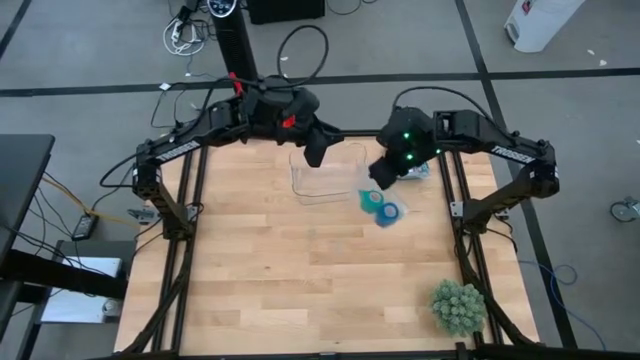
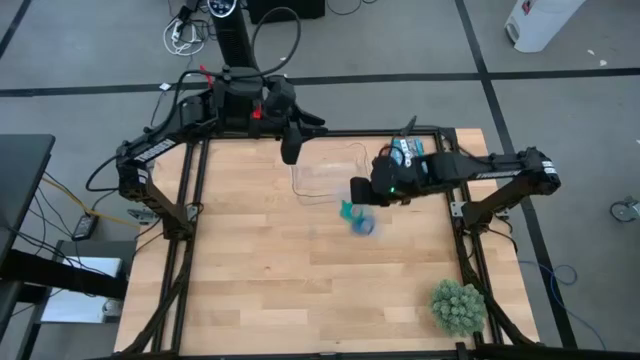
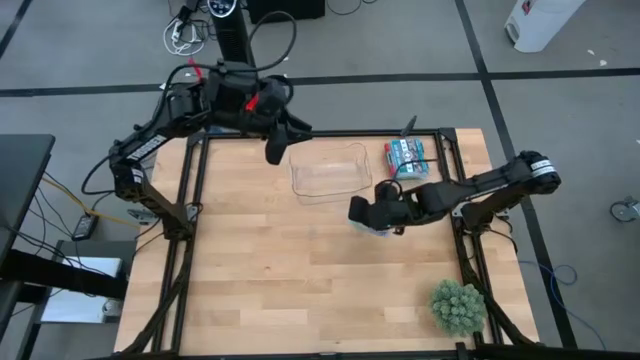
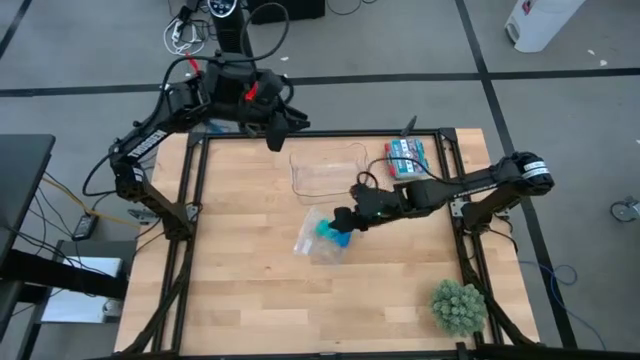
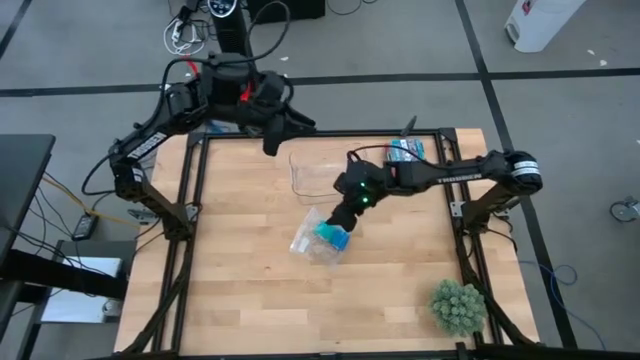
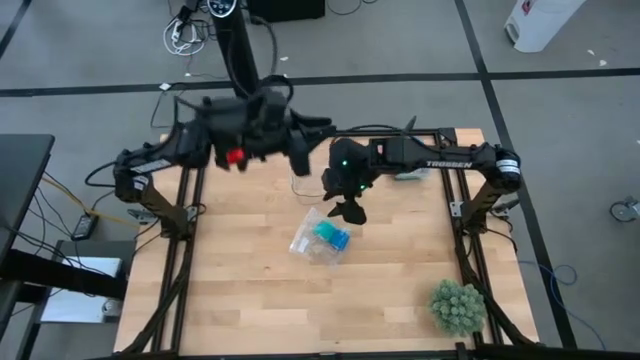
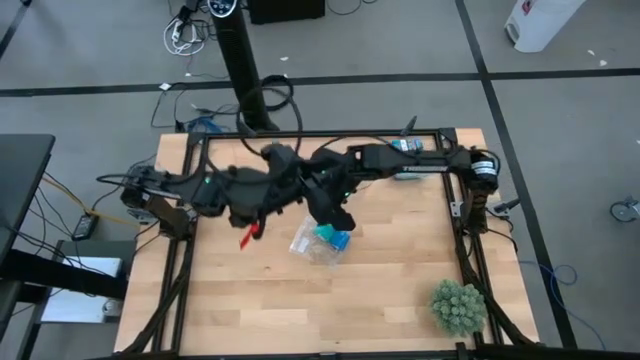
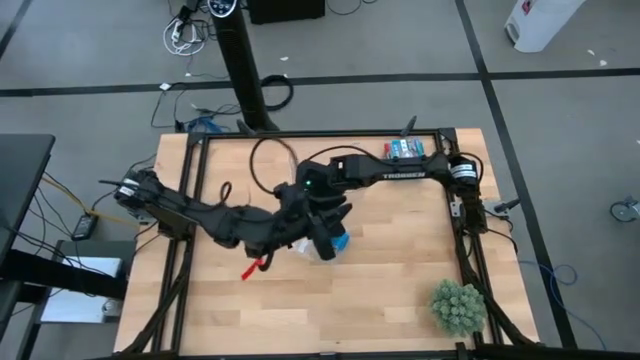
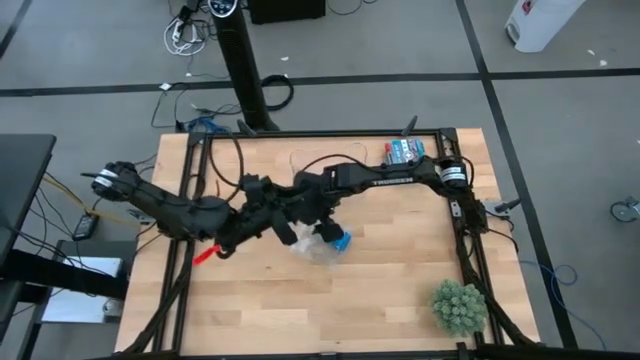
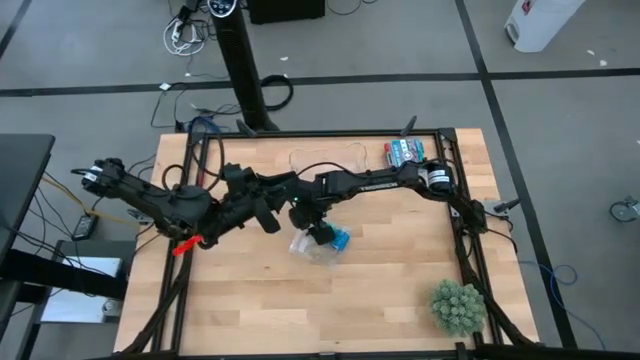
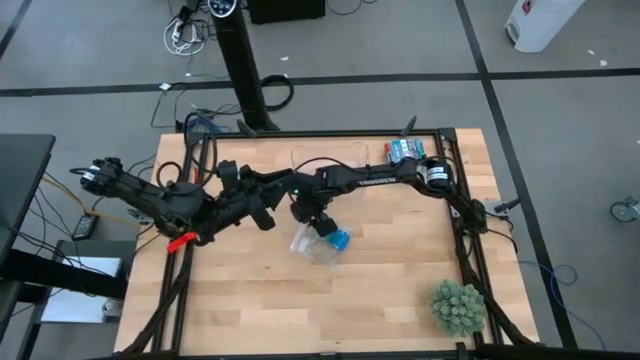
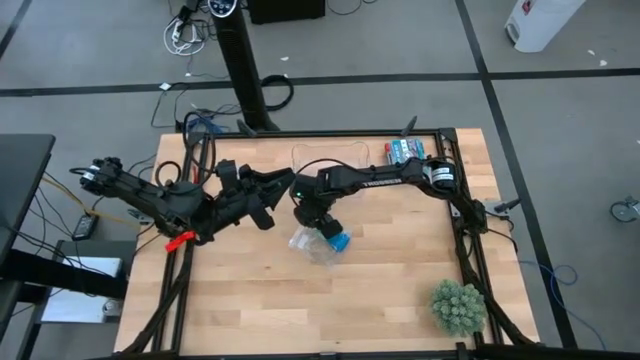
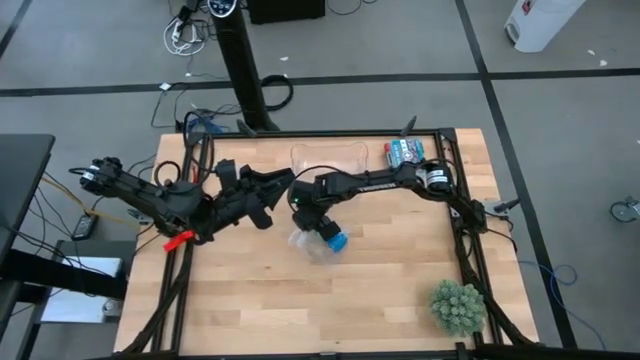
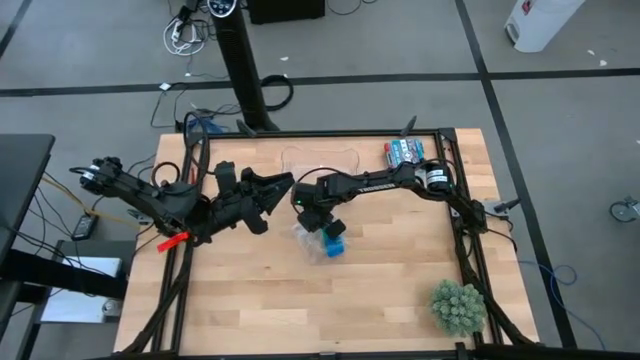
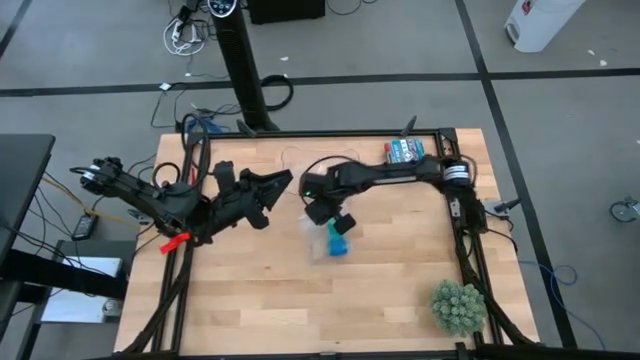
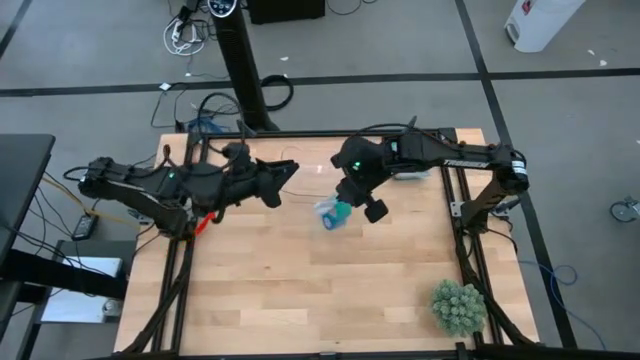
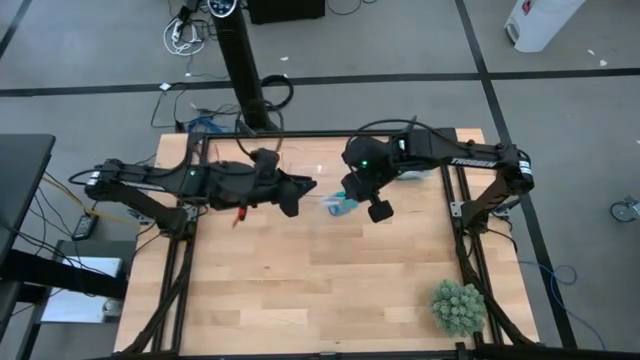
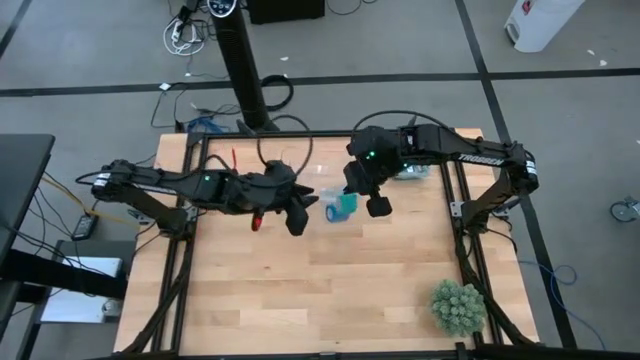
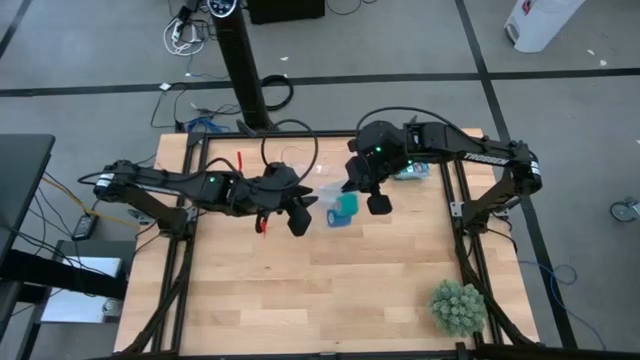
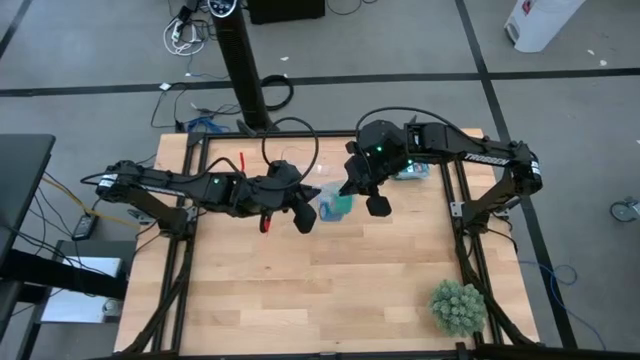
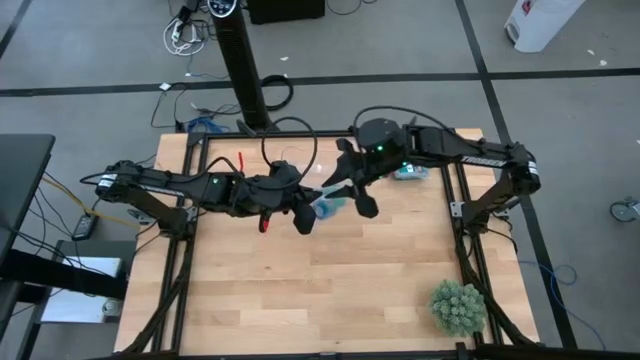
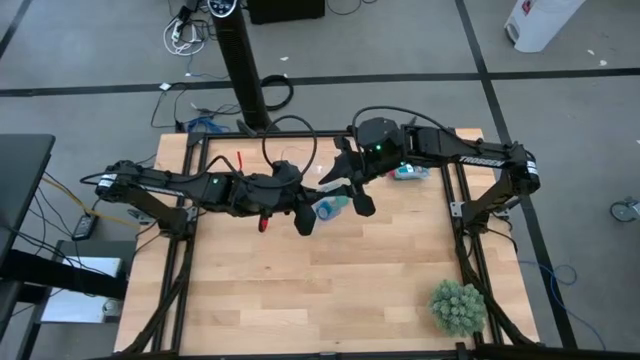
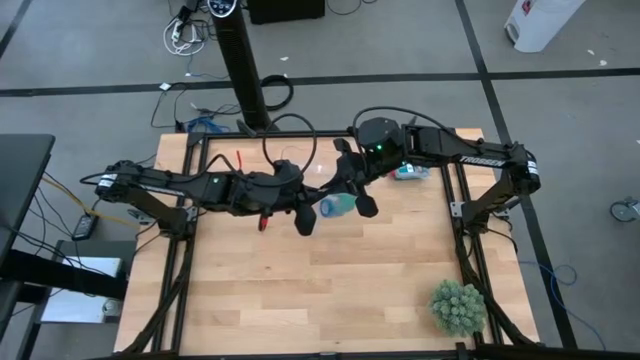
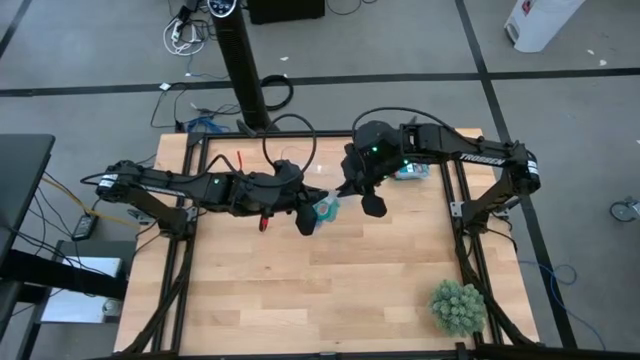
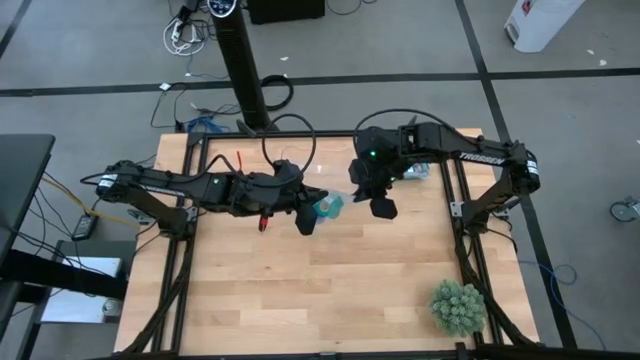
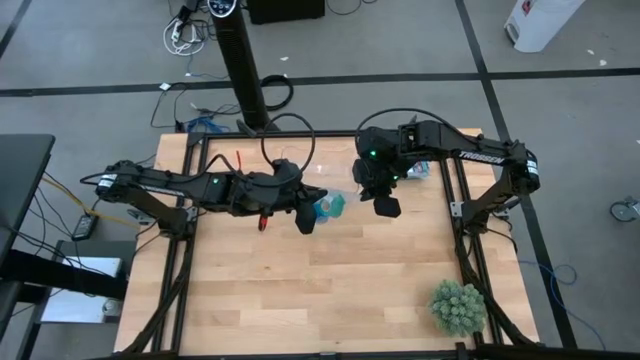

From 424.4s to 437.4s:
Task: Roll bandage
Close the transparent zip bag

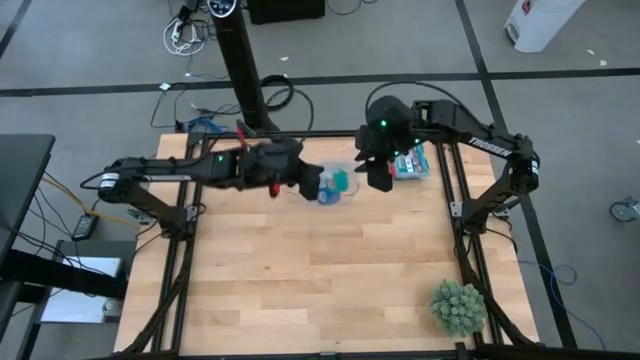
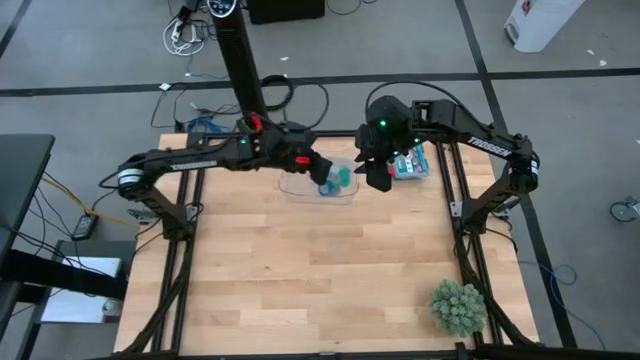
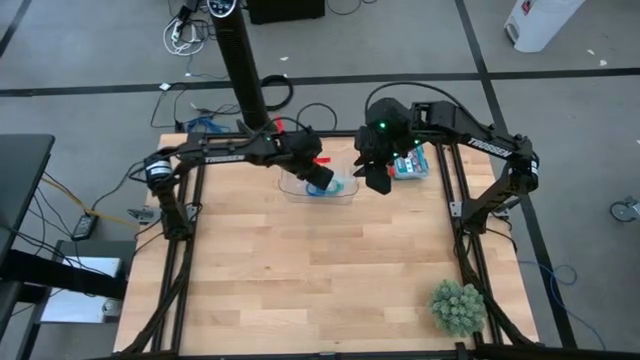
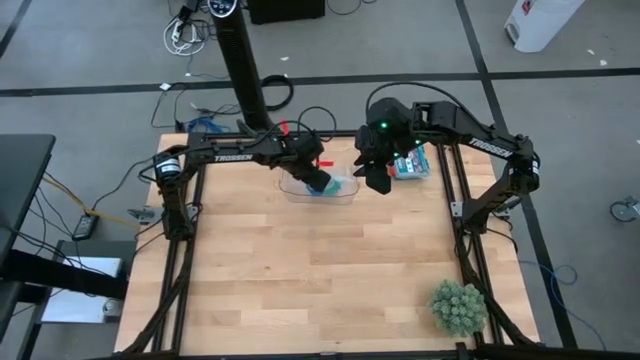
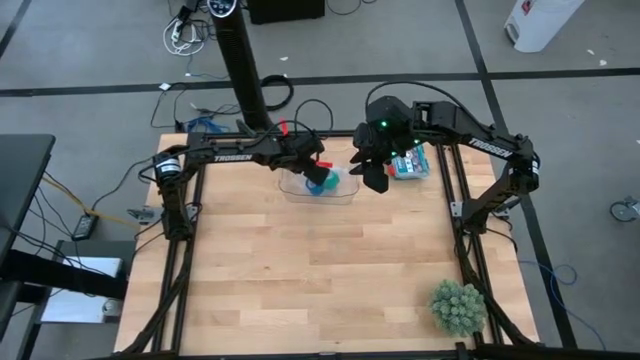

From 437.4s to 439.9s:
Put the transparent zip bag into the transparent bin

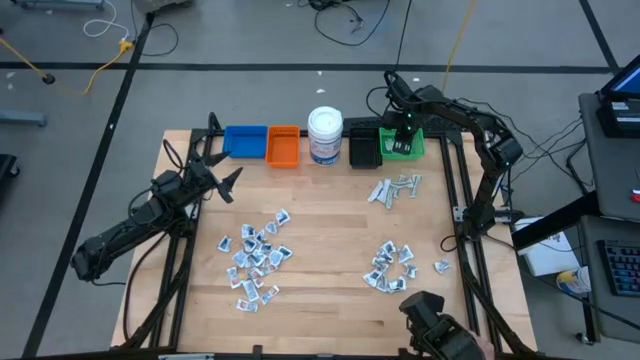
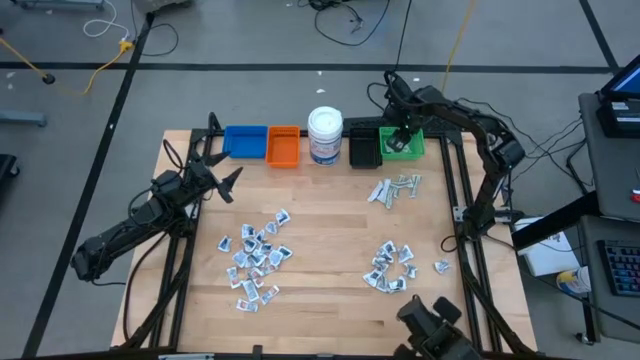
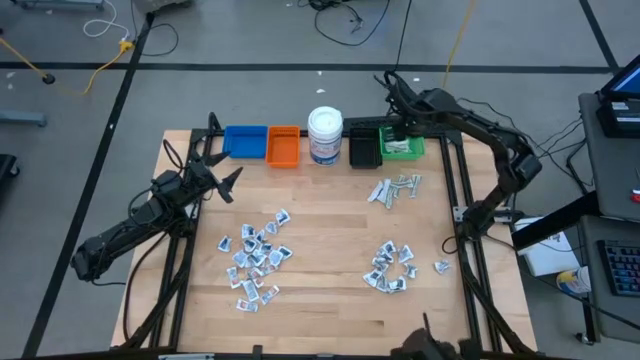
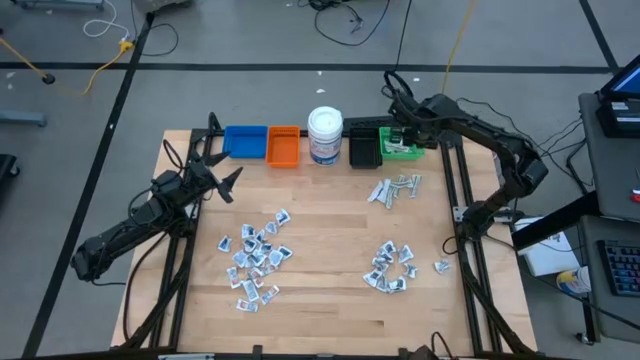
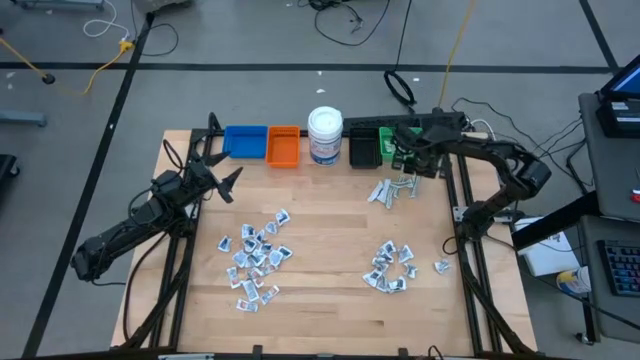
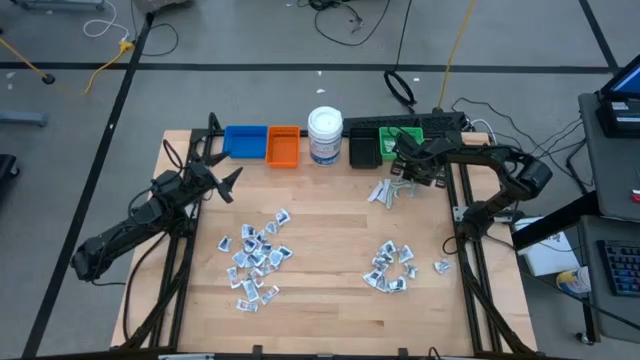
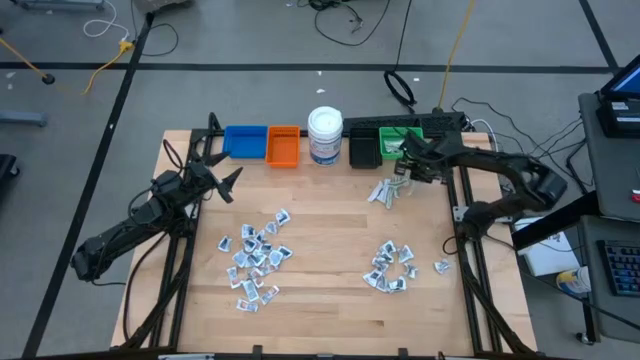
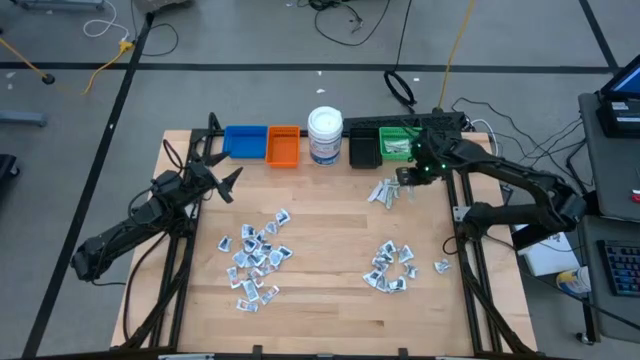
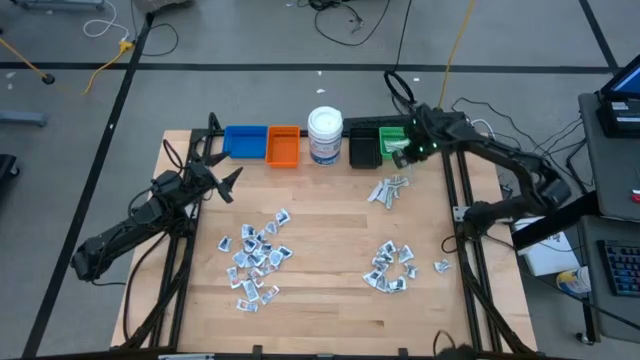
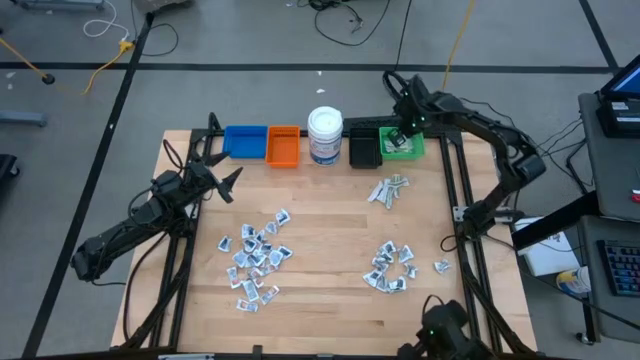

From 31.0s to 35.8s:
Task: Pick & Place First Aid Supplies
Put the bandage into the green bin
